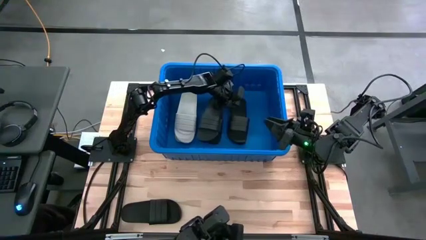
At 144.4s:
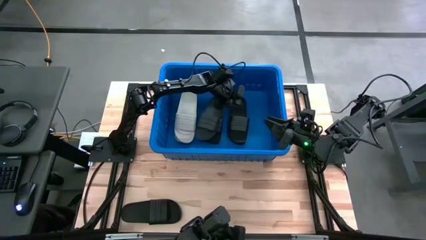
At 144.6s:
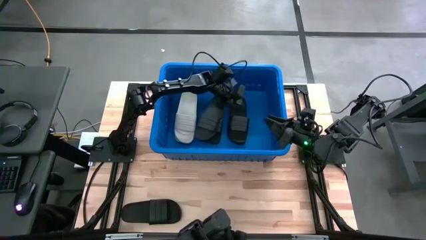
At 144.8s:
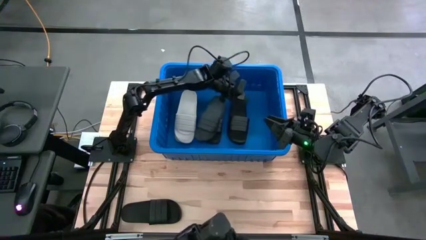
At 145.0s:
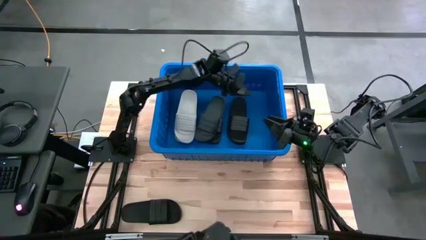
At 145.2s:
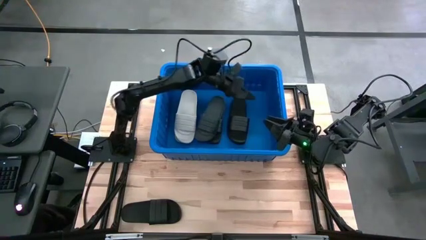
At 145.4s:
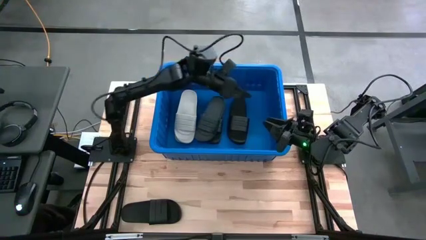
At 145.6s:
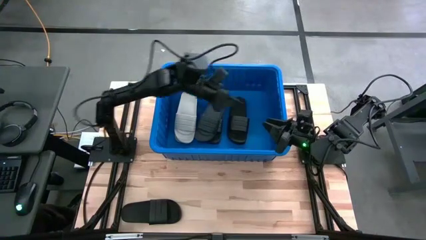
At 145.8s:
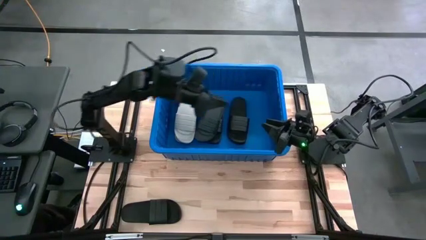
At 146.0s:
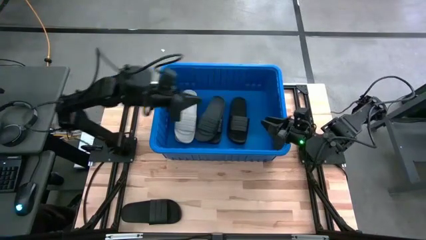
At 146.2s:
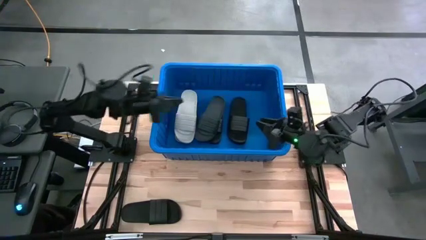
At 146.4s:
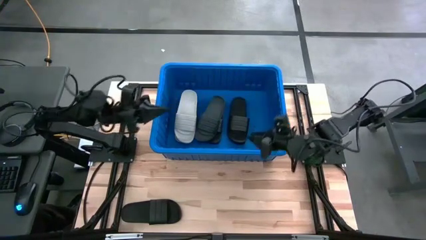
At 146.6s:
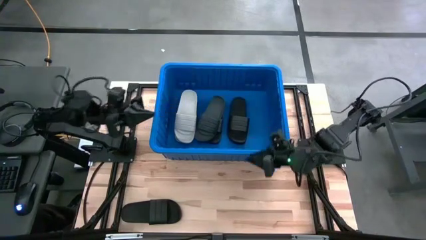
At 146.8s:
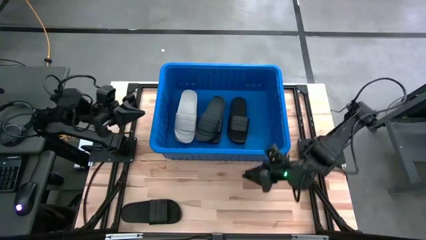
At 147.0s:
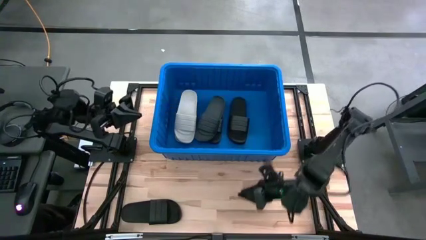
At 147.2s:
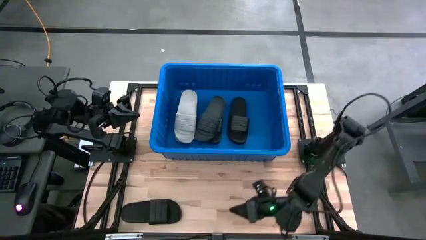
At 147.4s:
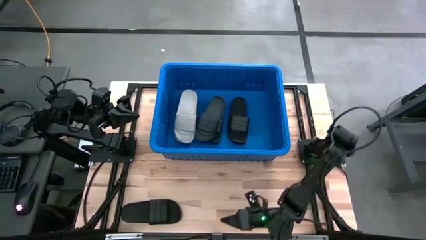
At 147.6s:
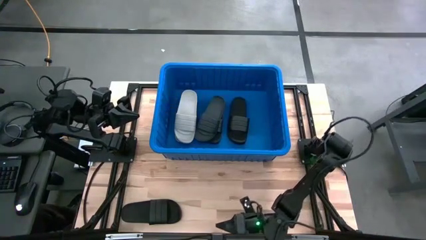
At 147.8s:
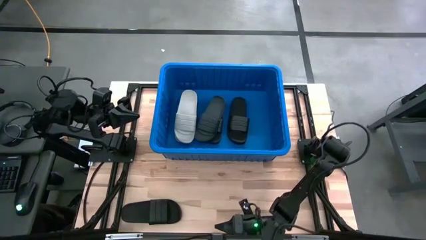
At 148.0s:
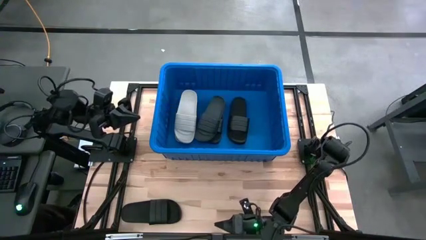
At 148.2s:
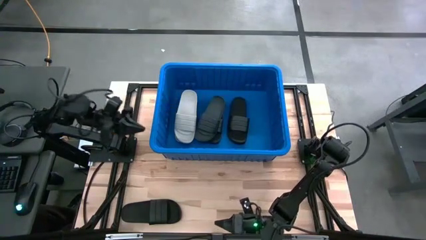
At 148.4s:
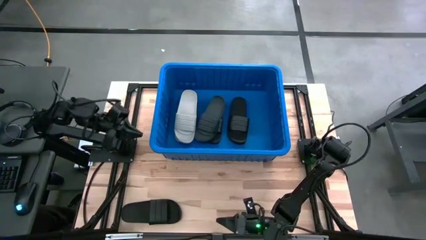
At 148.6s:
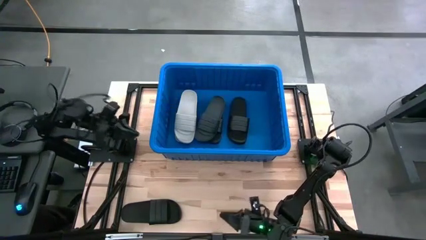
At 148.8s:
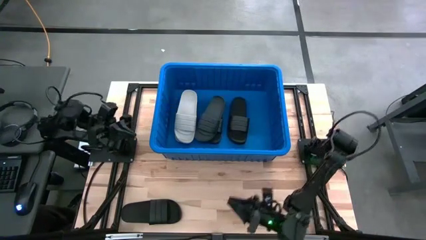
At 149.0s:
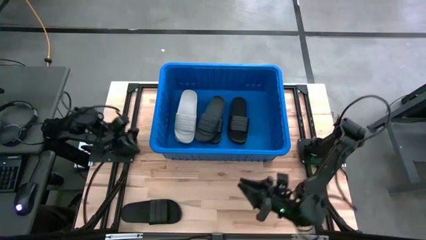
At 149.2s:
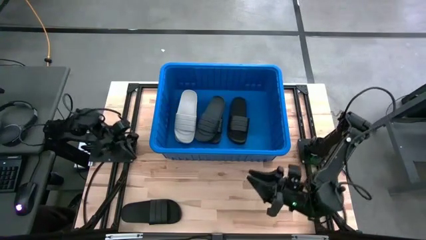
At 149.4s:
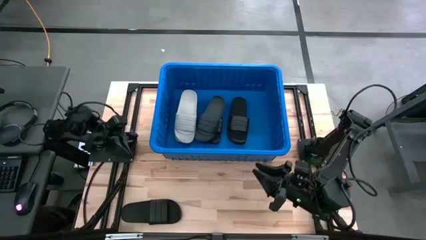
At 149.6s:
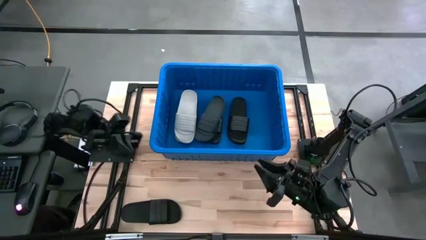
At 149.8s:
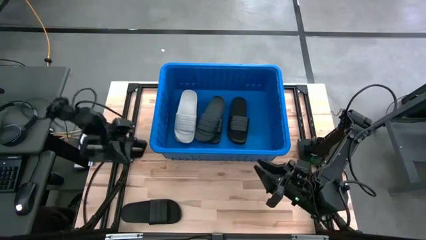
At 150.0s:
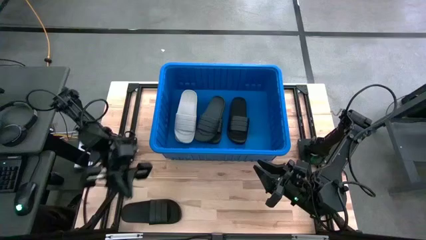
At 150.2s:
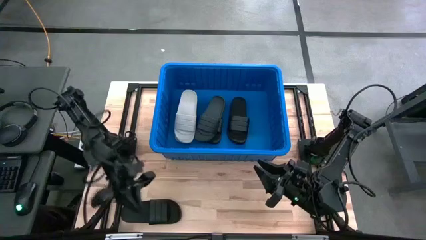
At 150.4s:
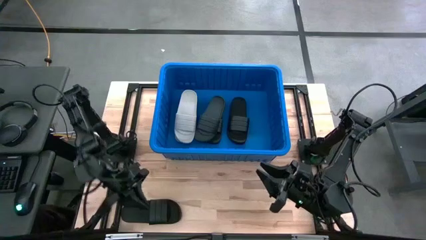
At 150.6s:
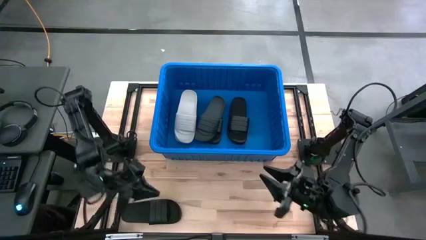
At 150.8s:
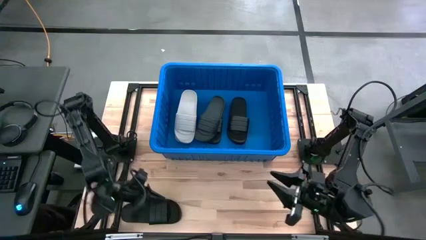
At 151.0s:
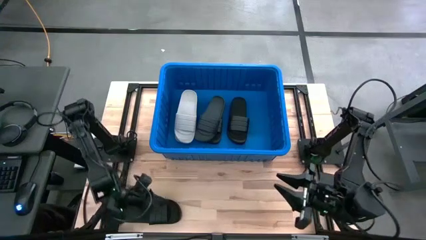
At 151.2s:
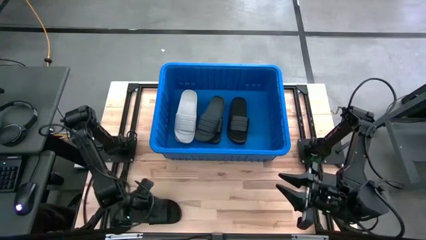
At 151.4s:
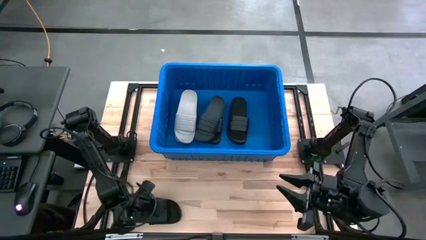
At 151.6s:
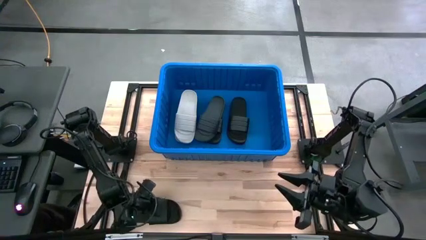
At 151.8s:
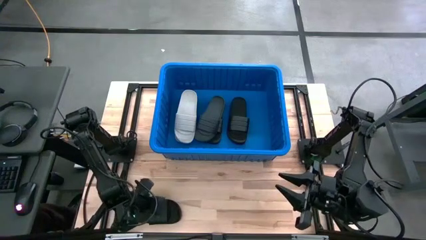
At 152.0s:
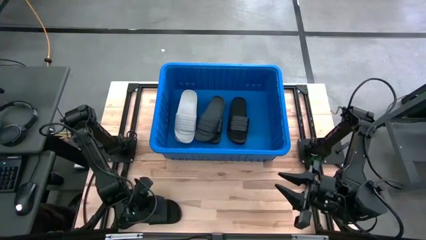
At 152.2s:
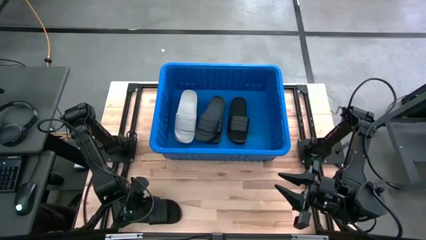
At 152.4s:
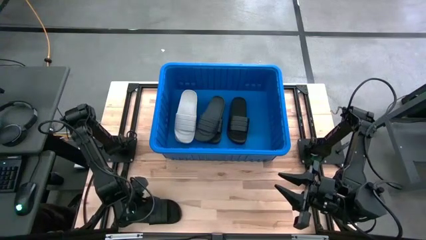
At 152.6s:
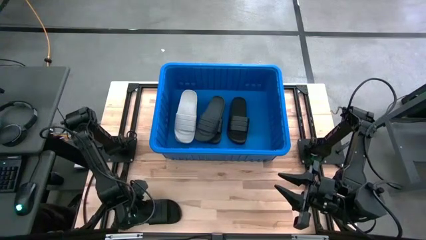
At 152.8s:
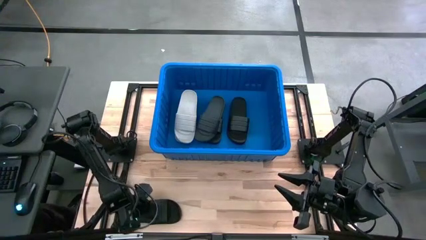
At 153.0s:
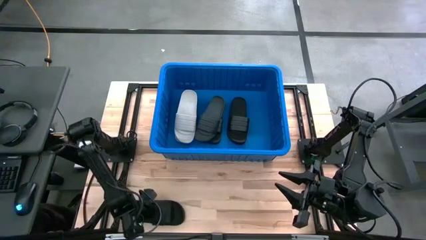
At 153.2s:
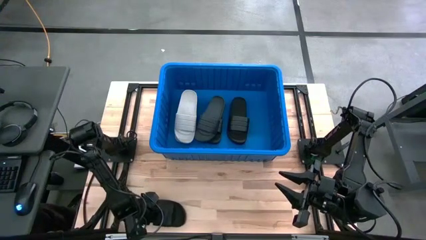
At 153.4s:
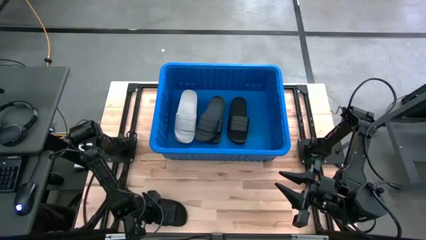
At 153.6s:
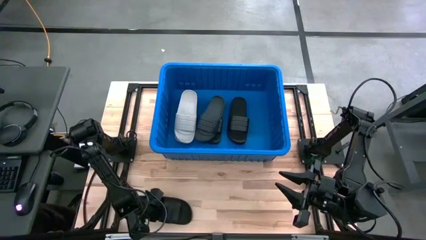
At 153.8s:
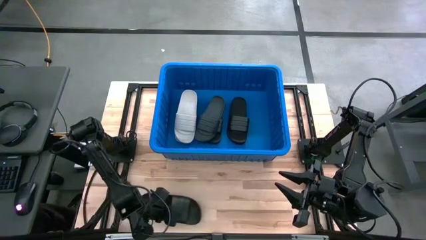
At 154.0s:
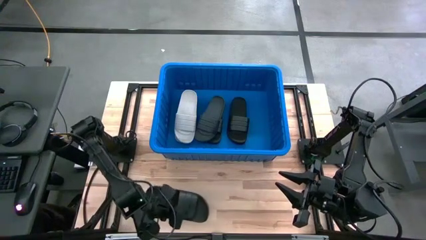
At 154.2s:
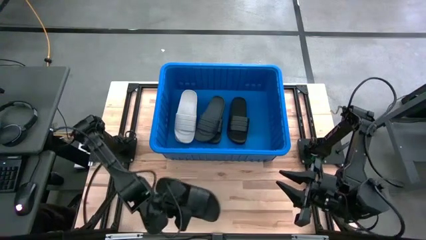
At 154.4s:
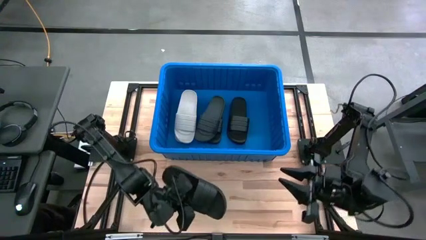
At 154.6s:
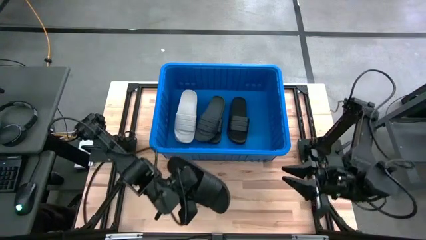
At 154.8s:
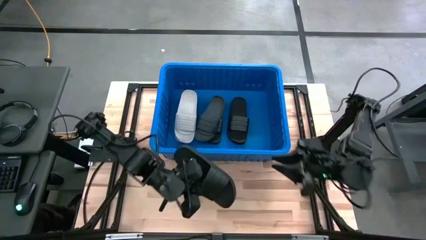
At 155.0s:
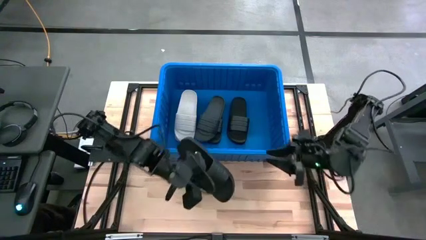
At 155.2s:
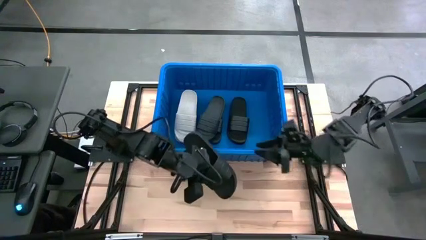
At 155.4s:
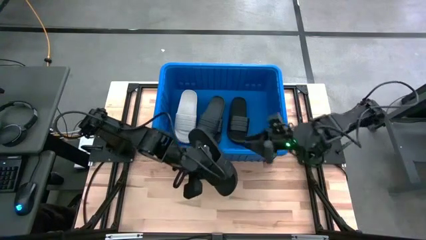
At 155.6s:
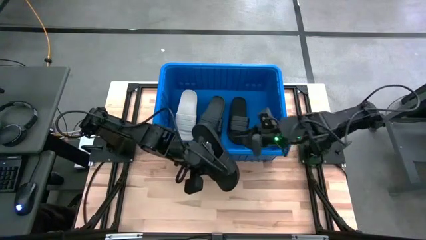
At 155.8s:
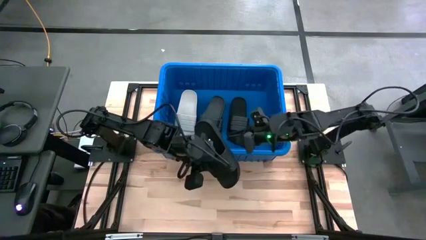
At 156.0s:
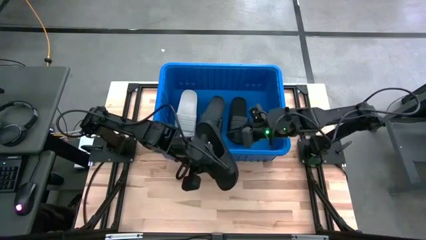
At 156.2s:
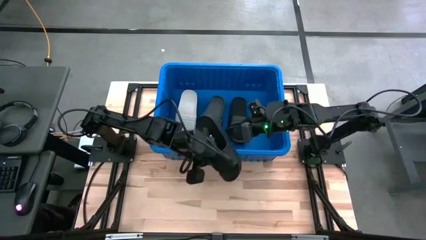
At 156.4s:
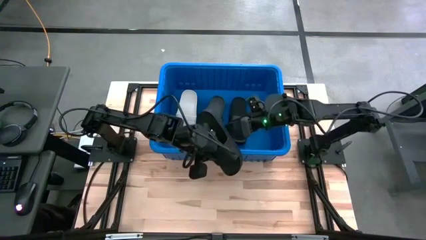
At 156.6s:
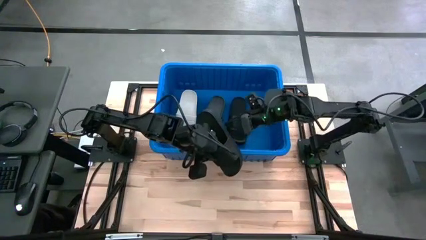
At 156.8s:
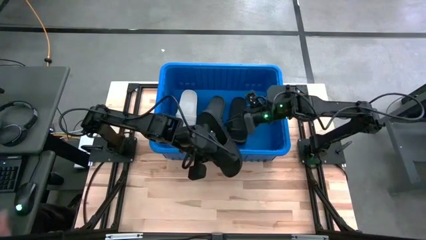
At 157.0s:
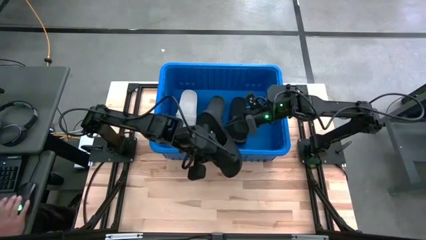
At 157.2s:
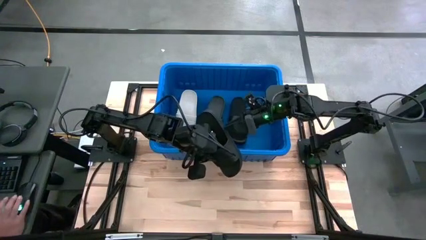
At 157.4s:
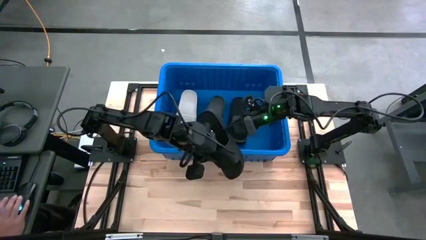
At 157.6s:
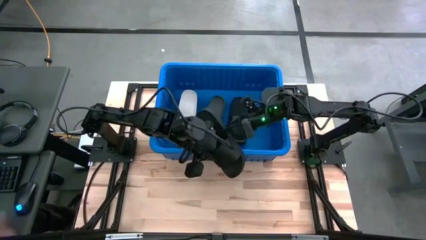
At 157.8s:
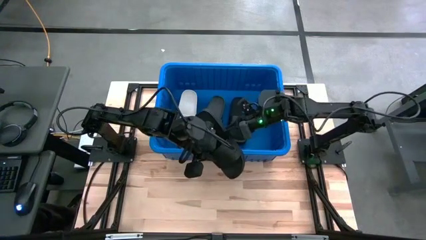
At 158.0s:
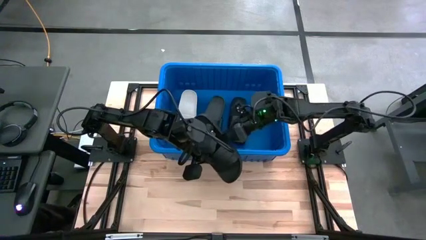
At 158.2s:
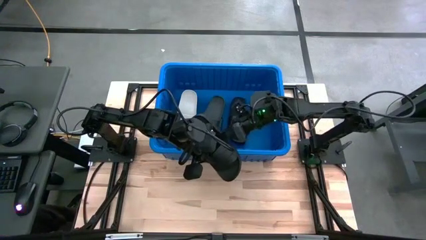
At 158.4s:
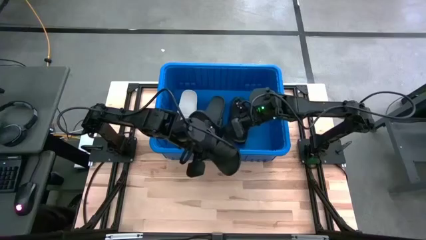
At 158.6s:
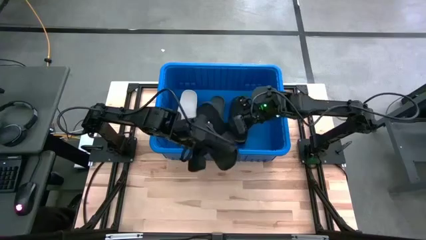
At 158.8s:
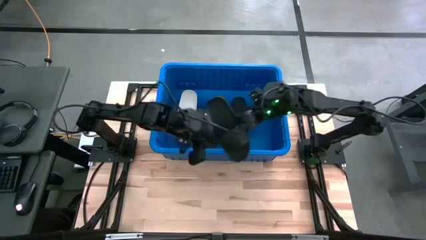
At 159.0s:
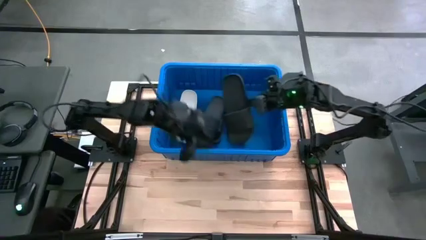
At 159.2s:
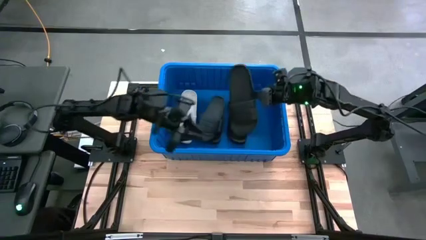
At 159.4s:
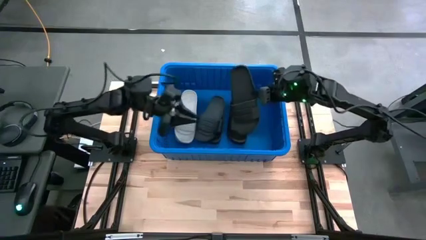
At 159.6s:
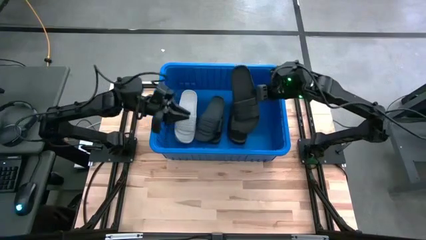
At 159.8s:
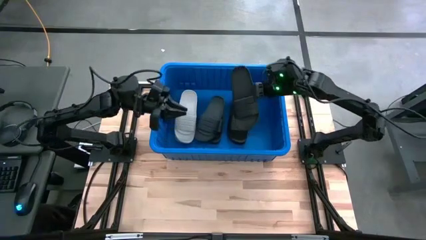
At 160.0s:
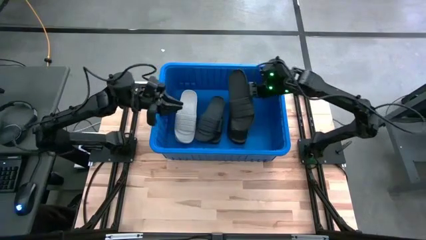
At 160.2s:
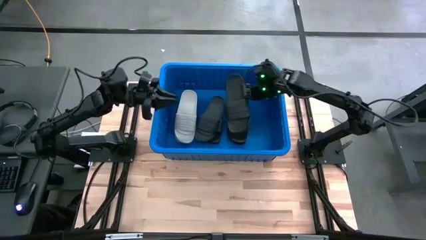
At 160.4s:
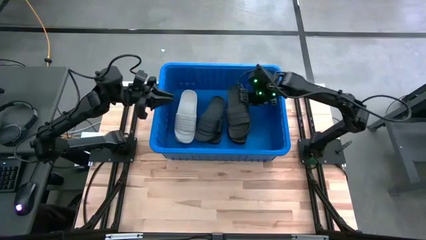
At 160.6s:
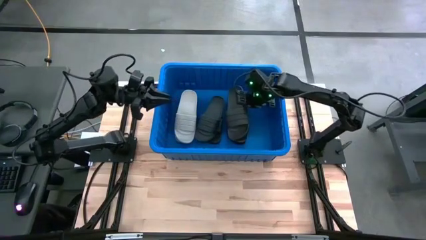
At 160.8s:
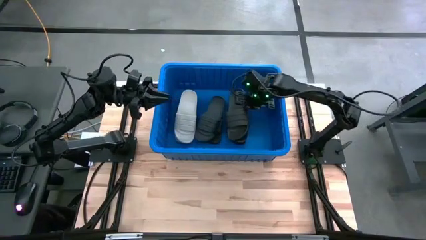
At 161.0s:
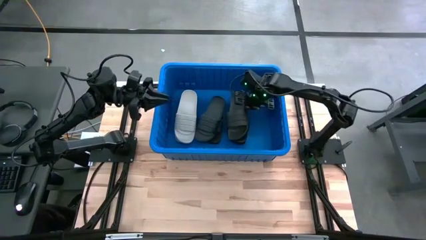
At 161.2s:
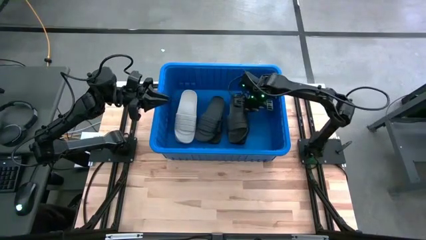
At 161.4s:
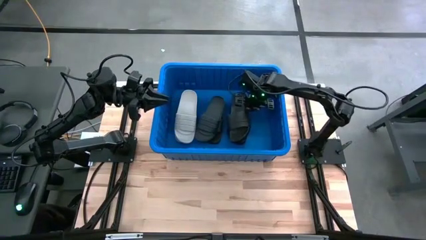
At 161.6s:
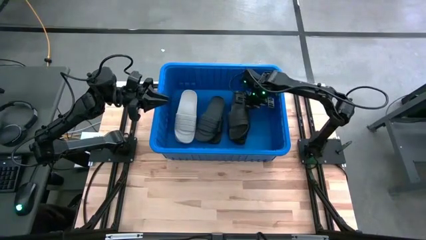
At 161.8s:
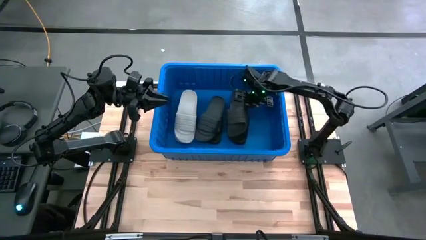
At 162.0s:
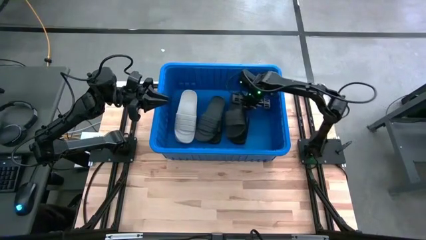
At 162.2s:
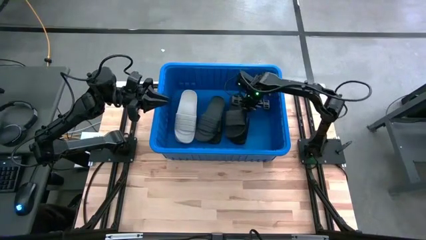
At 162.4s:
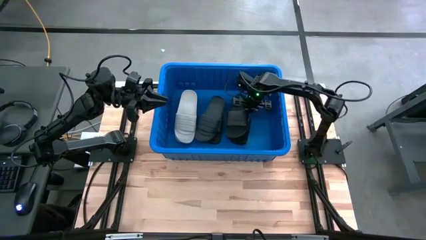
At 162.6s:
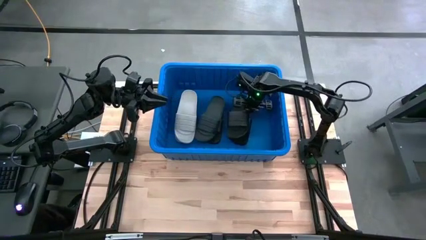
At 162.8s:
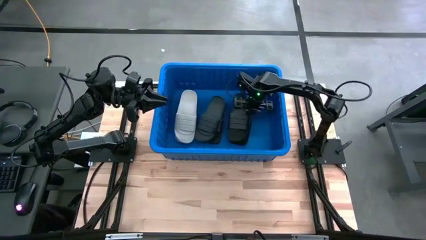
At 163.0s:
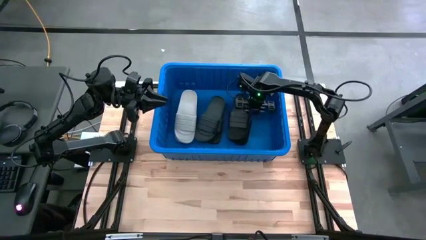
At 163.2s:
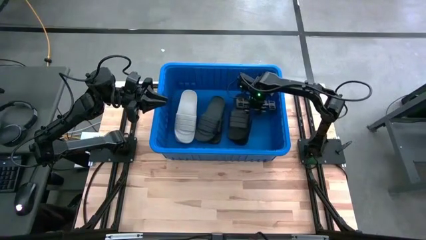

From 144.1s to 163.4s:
Task: Pick and place slides into bin
Stack the black slide on top of the black slide in the blue bin
